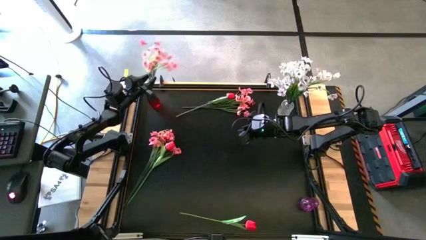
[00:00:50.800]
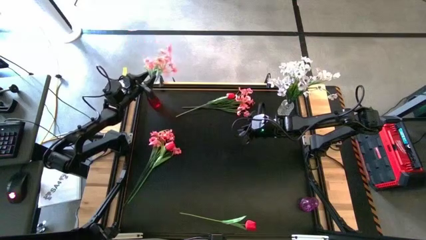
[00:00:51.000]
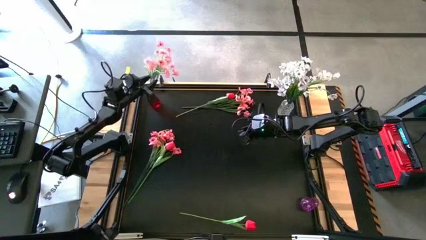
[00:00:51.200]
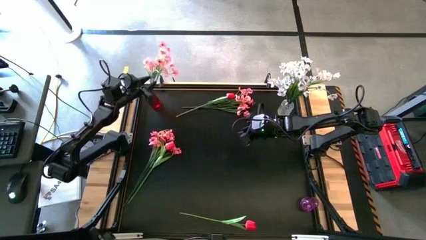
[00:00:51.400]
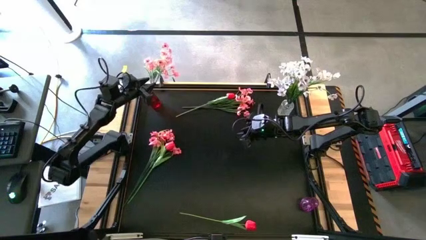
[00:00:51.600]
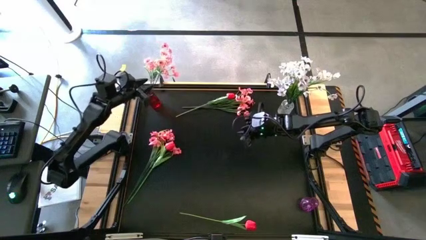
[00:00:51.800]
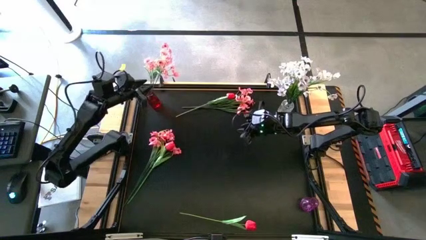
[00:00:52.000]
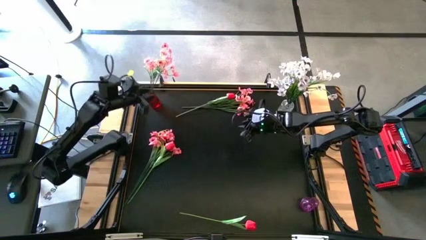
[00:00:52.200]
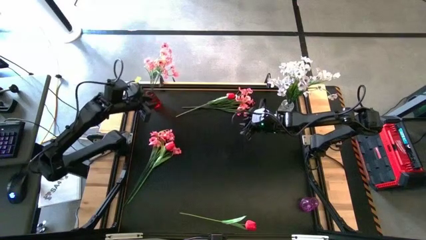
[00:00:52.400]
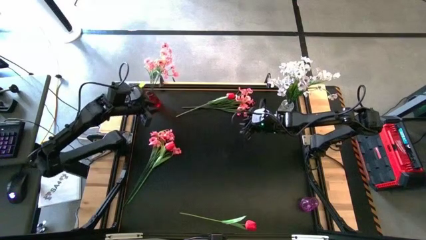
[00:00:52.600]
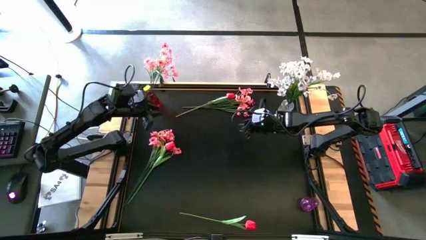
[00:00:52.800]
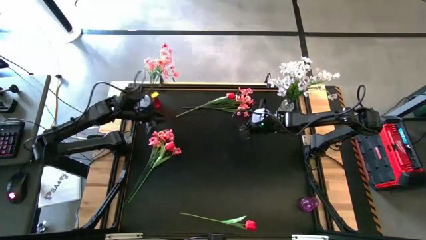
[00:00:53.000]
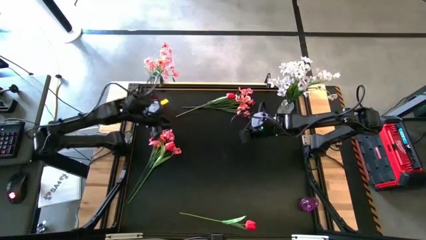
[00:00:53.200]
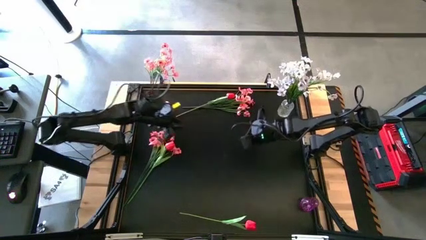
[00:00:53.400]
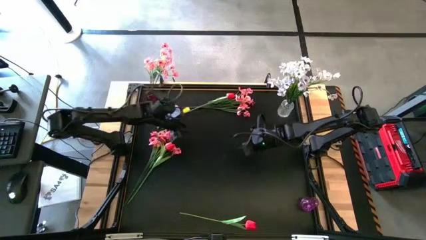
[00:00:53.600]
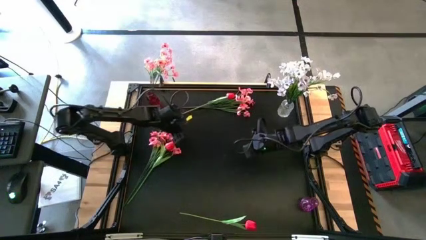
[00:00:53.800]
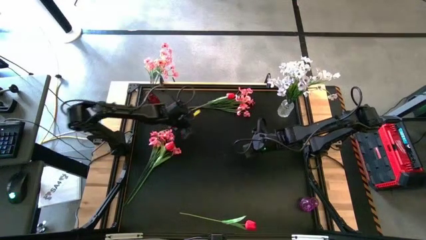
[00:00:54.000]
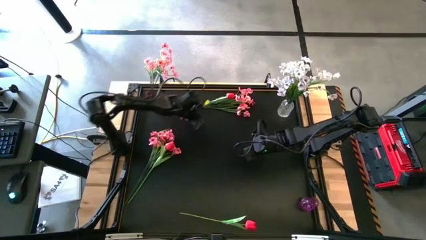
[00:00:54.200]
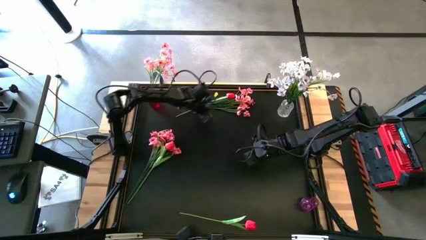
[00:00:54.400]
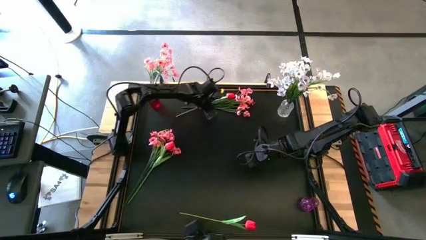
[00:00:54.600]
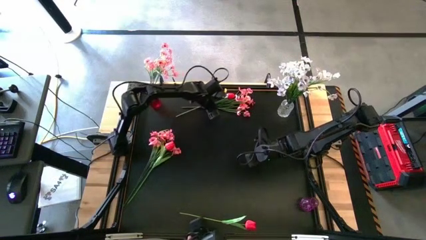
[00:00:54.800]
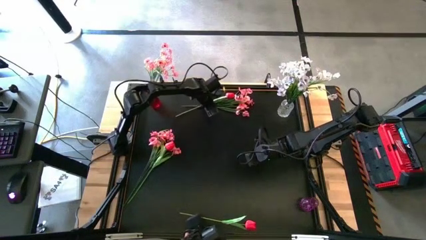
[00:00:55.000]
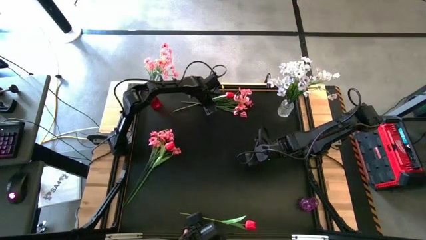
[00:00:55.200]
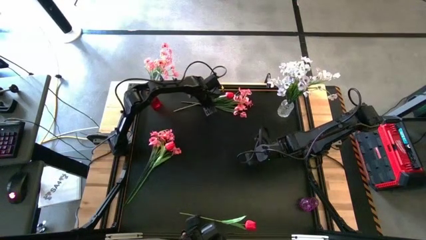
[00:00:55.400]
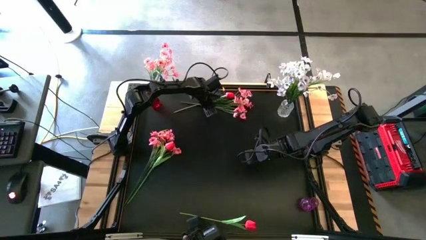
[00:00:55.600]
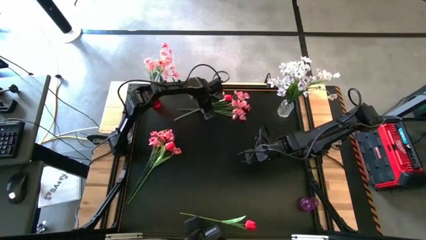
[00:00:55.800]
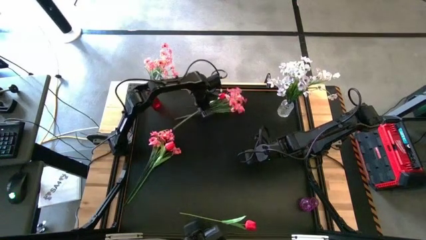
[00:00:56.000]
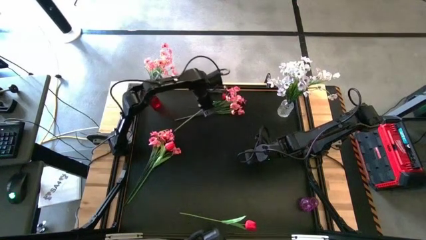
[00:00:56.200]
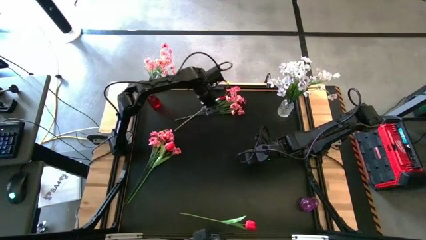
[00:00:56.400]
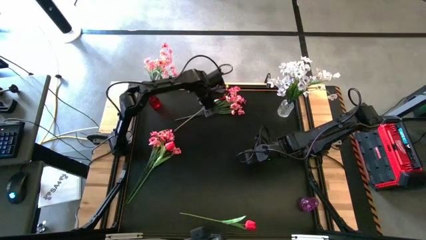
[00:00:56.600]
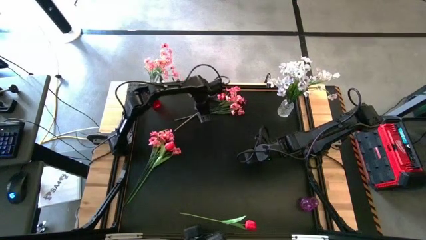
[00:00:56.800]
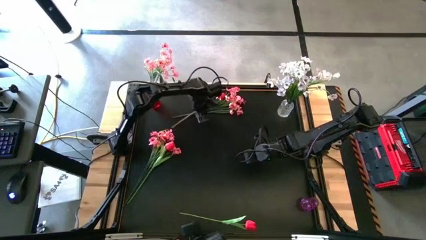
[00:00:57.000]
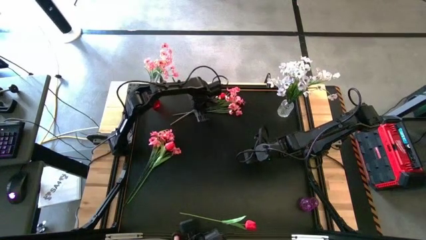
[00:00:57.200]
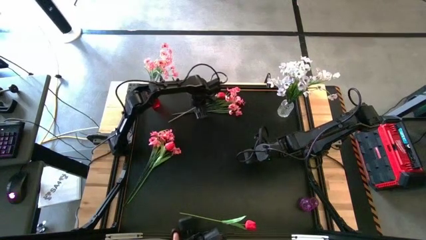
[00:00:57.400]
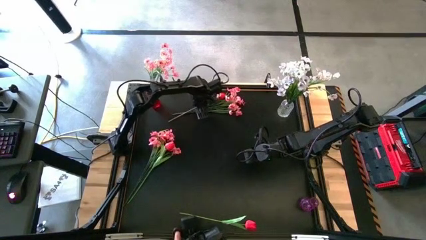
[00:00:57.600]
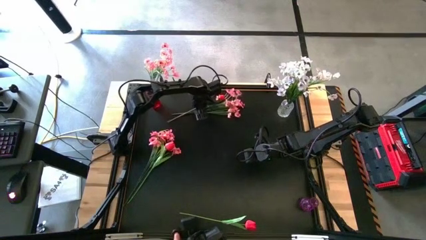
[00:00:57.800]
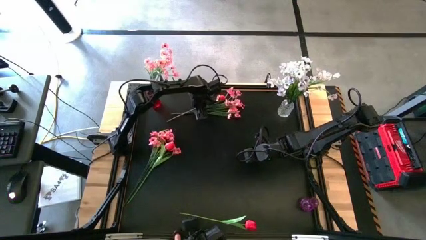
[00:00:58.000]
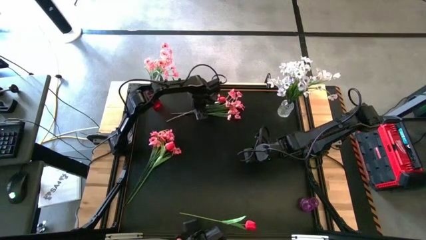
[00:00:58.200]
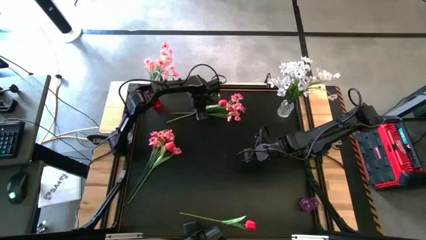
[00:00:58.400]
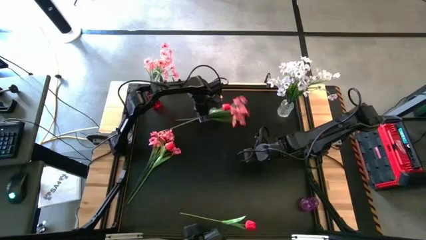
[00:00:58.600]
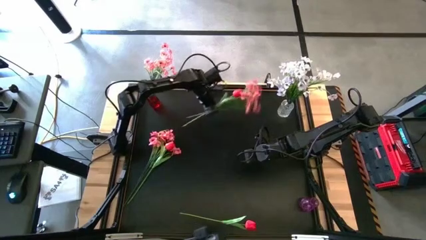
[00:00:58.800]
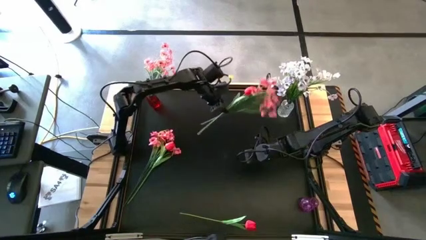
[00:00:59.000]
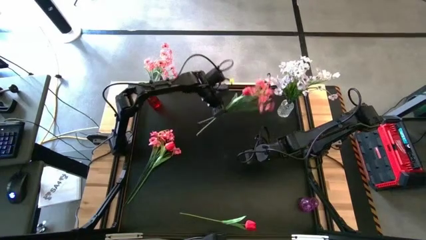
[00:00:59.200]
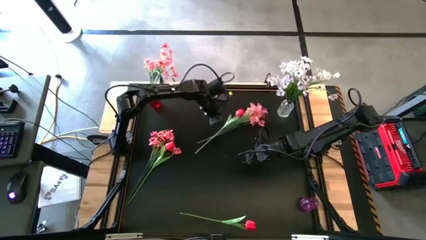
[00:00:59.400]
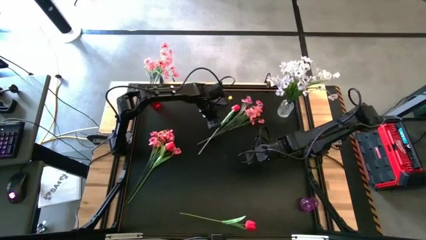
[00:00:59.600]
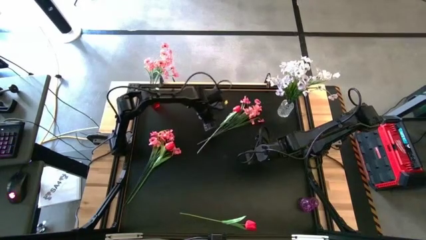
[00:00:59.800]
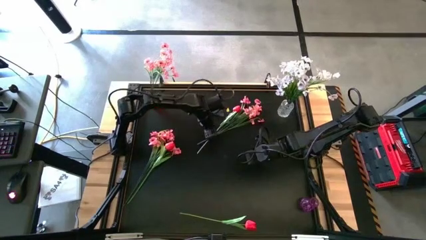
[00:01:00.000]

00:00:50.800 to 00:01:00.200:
Task: Sort flowers into vase by color
Put the top pink flowers into the red flower vase

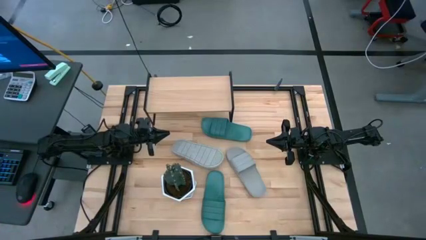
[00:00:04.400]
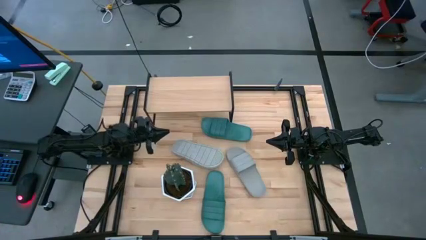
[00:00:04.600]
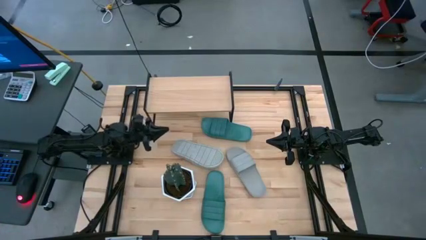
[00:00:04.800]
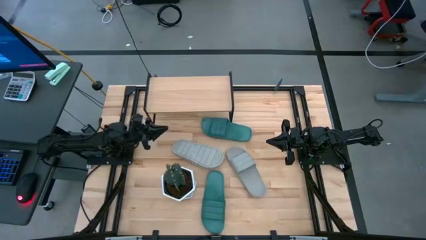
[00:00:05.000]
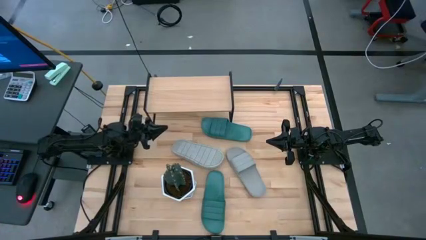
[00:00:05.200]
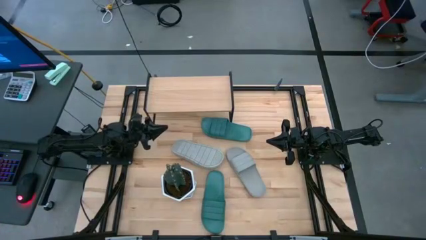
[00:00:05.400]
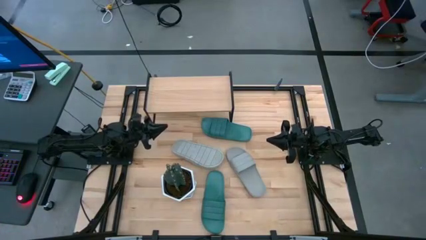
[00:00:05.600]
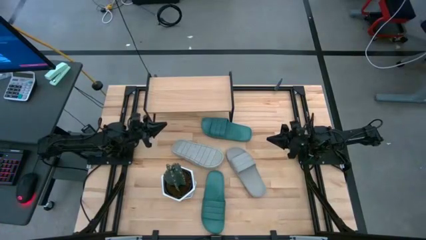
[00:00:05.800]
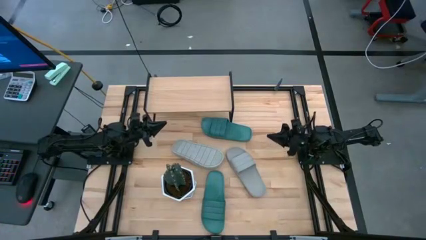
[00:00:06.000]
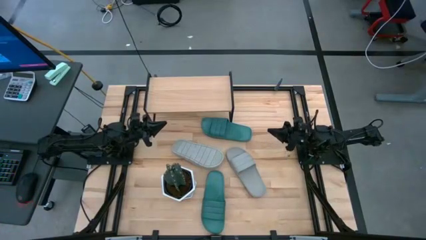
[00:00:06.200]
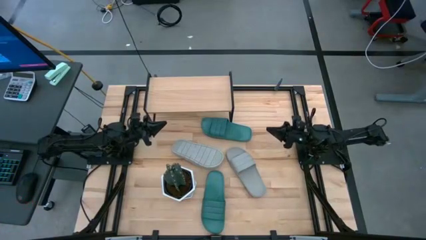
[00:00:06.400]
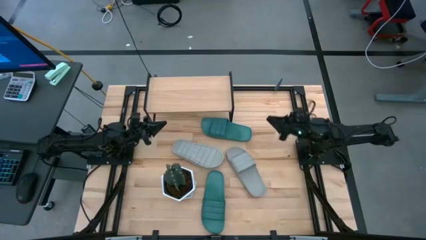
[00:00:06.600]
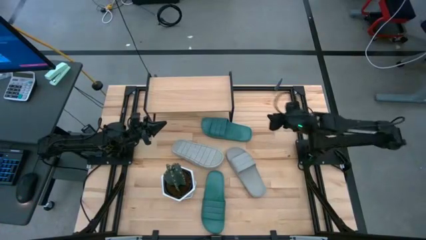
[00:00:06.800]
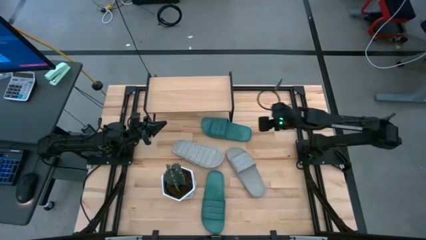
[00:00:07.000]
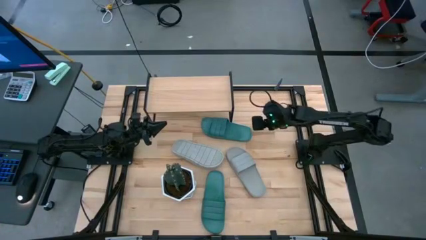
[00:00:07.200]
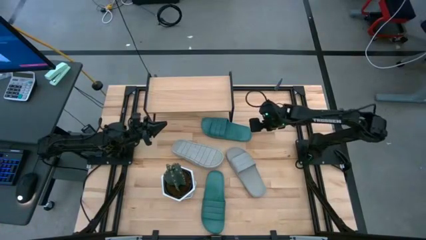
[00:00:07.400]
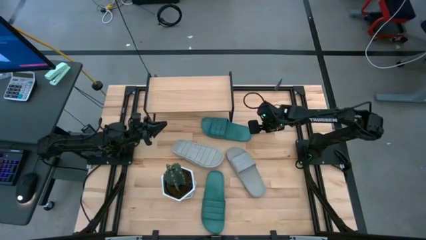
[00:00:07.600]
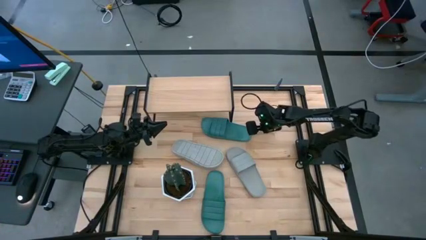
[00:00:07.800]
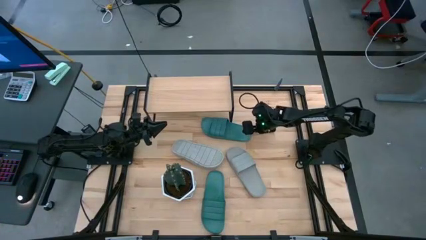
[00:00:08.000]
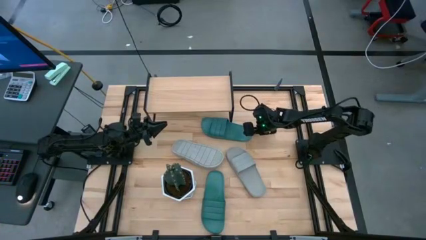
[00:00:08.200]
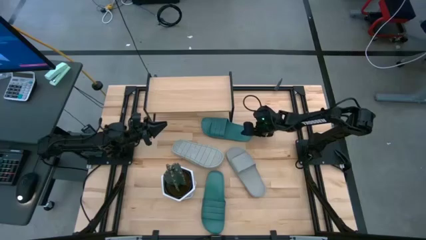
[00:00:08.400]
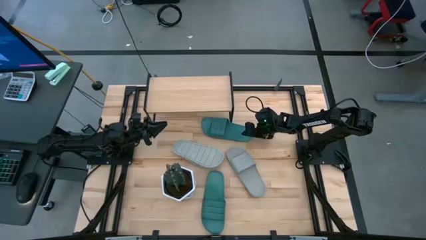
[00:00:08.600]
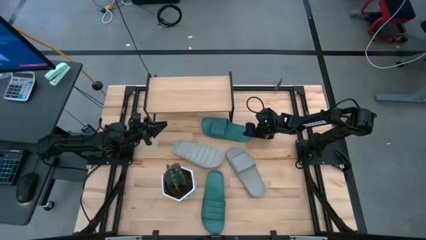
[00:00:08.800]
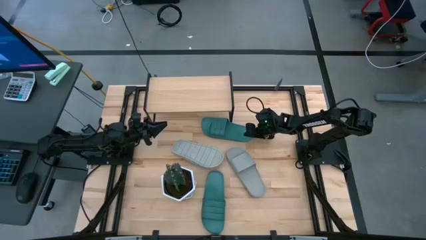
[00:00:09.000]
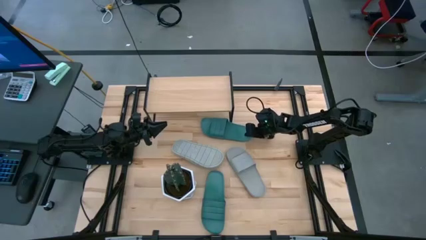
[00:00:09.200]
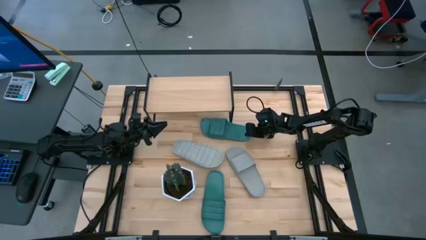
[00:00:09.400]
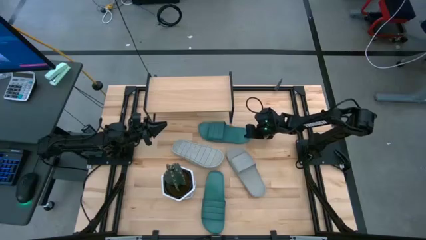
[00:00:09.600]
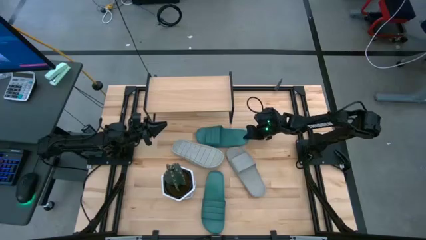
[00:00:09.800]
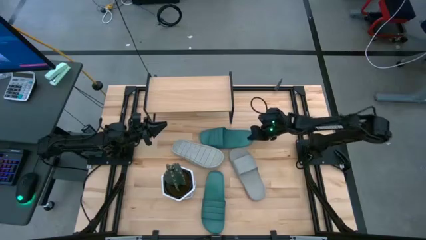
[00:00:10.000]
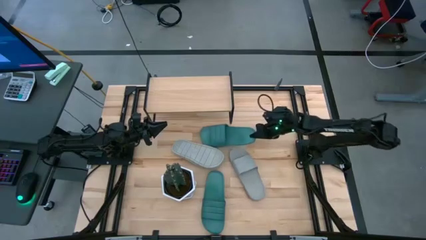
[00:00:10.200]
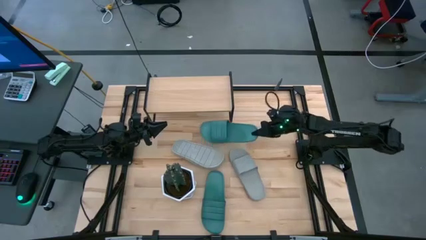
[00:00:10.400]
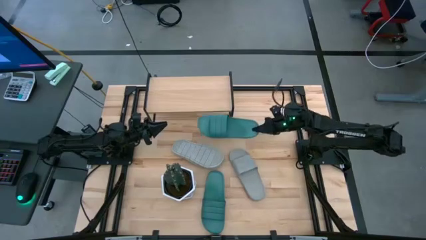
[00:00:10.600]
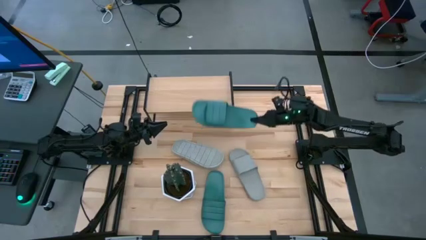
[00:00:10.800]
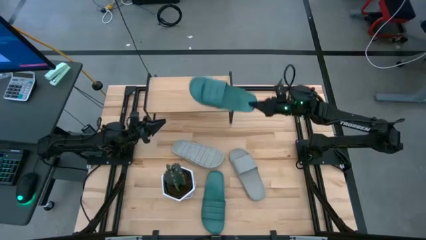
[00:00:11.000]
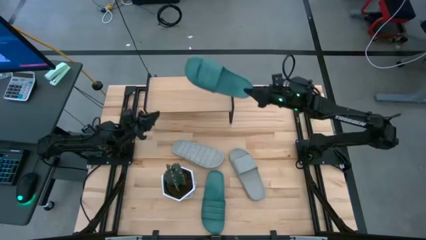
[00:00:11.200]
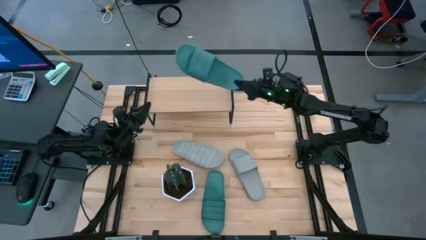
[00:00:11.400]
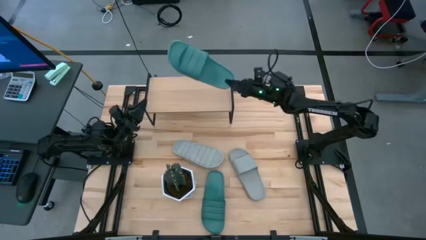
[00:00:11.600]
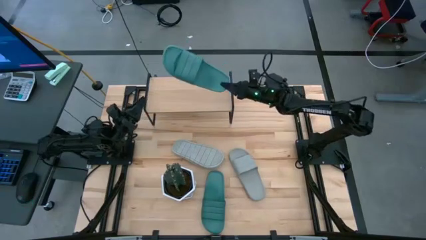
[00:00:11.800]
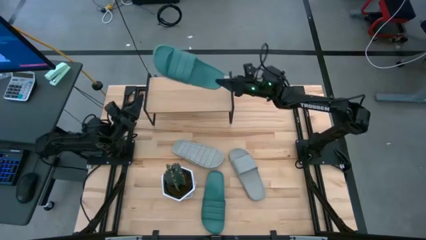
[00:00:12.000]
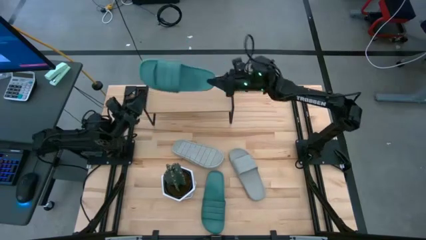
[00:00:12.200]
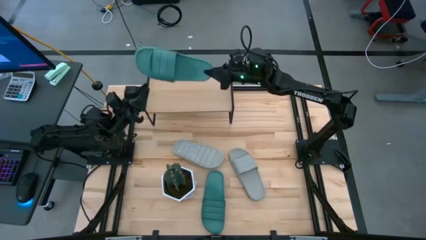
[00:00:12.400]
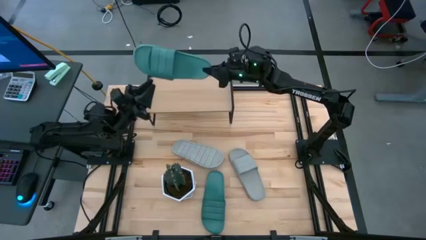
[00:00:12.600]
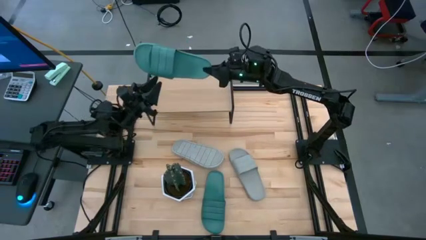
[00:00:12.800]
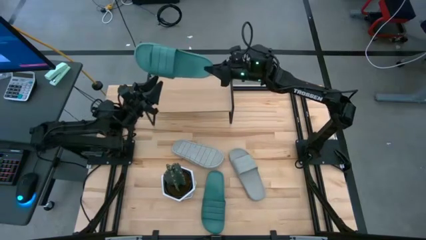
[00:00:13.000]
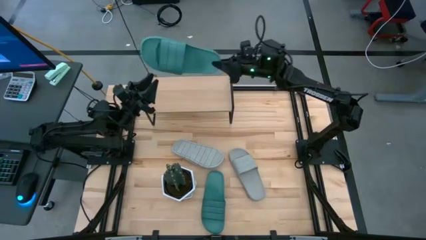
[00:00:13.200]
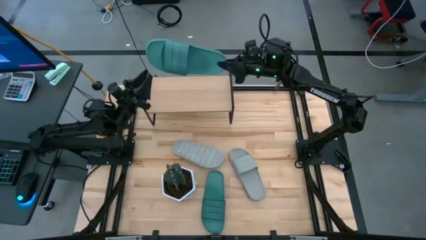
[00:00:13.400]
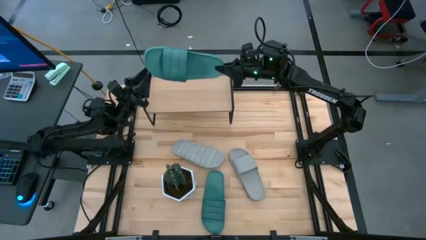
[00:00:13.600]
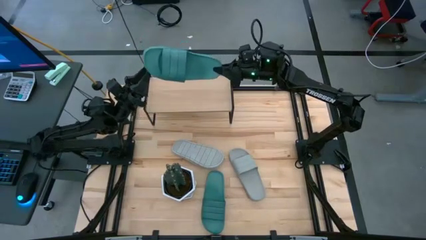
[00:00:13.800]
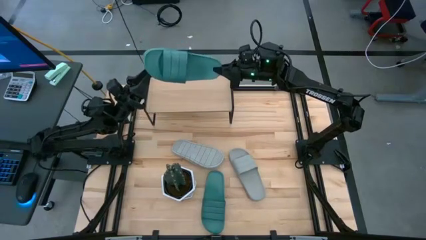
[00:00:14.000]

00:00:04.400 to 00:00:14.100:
Task: Pick and place slides into the shelf
Put the top green slipper on the shelf
